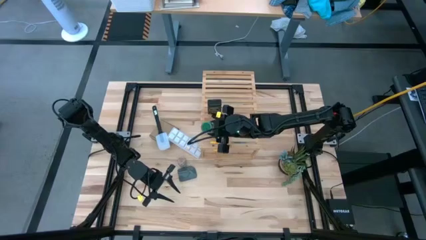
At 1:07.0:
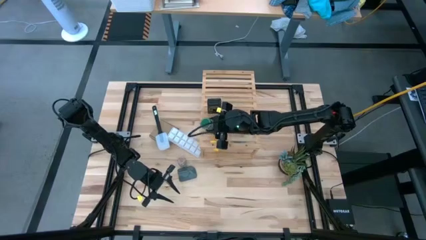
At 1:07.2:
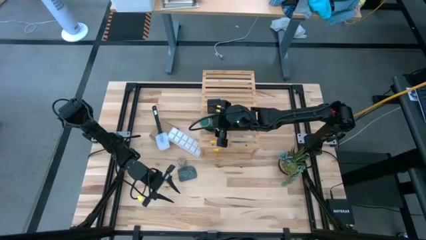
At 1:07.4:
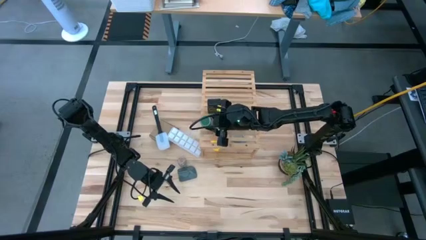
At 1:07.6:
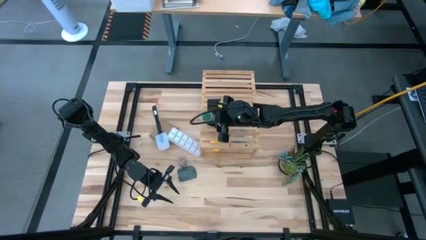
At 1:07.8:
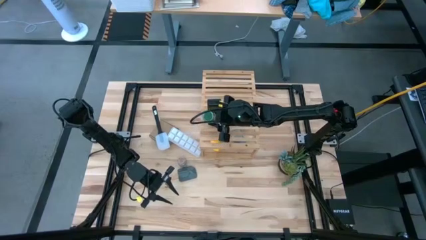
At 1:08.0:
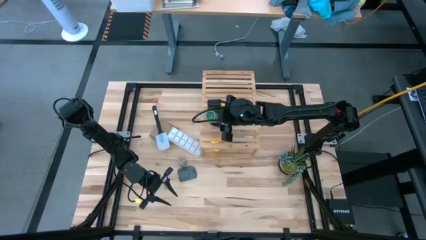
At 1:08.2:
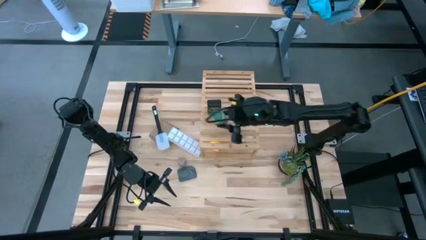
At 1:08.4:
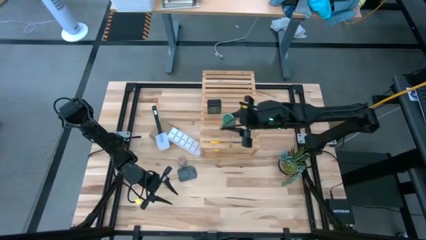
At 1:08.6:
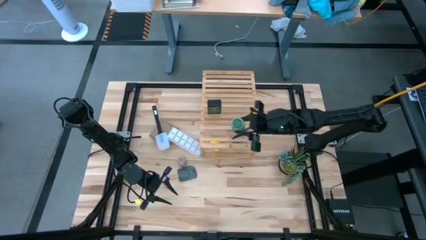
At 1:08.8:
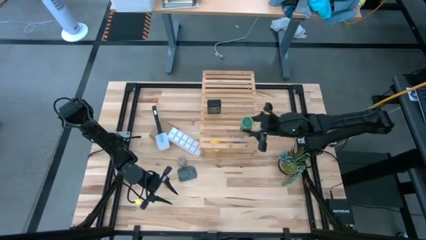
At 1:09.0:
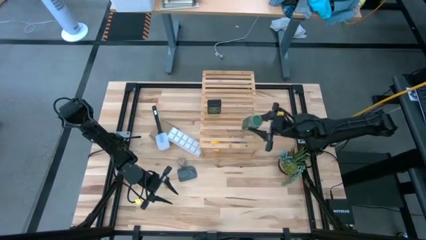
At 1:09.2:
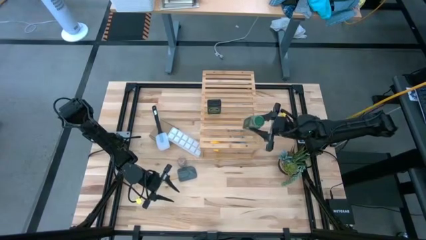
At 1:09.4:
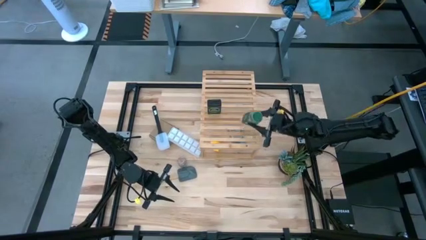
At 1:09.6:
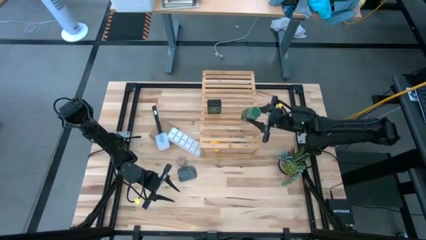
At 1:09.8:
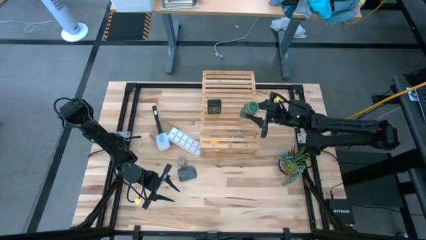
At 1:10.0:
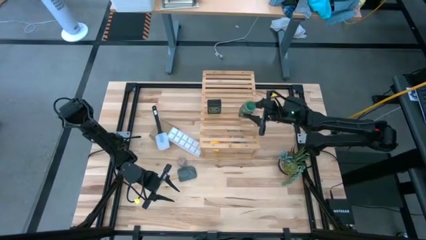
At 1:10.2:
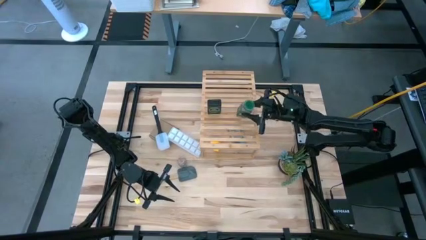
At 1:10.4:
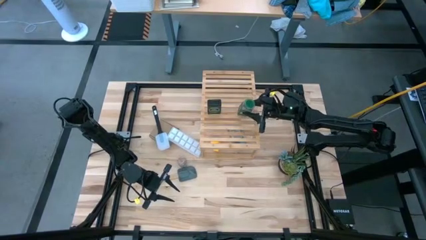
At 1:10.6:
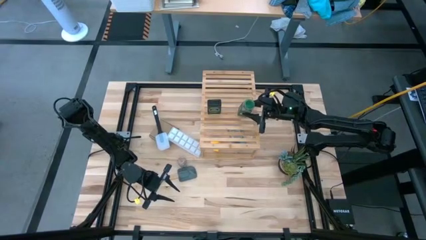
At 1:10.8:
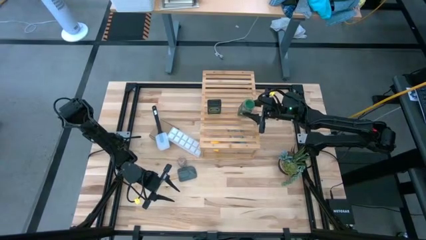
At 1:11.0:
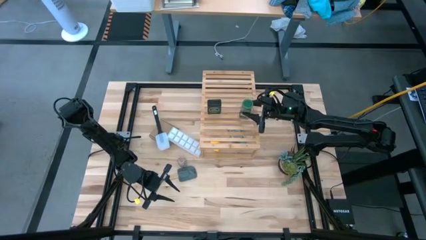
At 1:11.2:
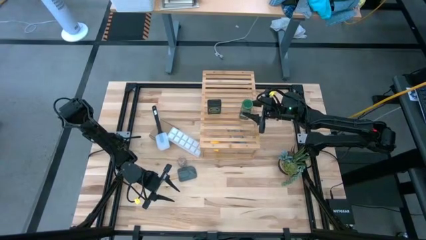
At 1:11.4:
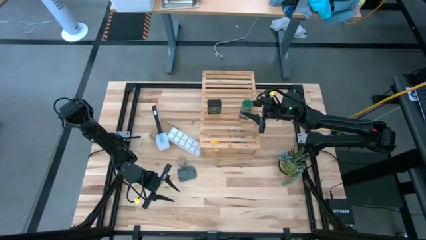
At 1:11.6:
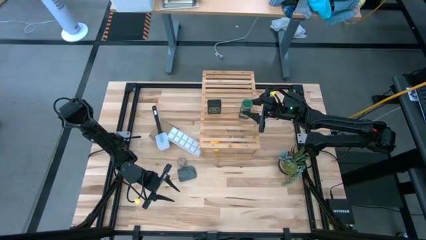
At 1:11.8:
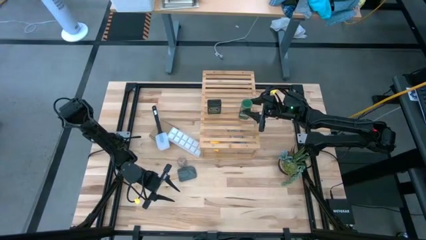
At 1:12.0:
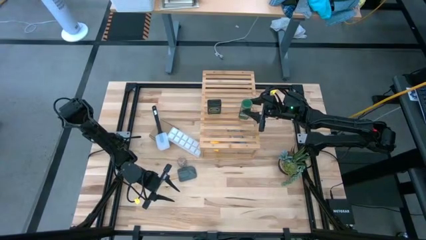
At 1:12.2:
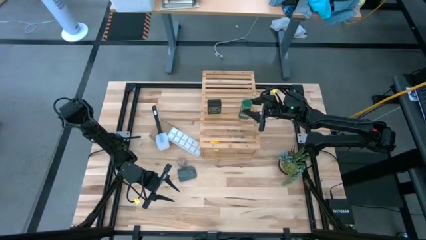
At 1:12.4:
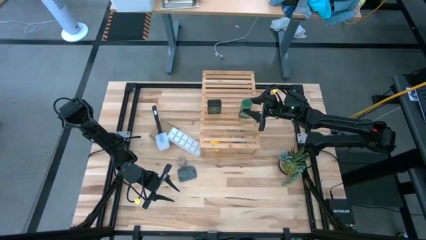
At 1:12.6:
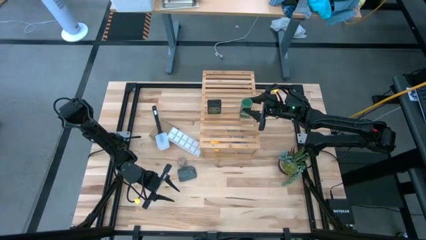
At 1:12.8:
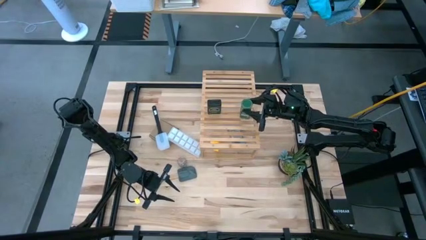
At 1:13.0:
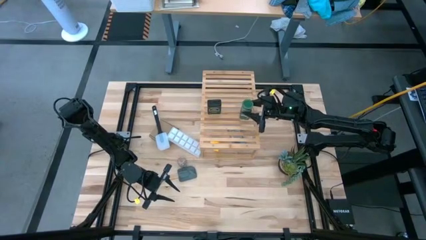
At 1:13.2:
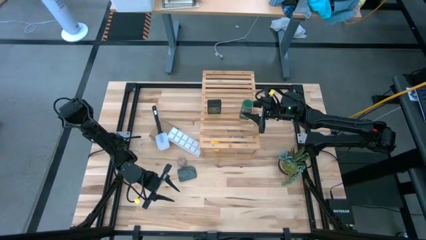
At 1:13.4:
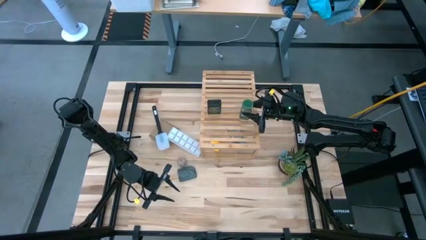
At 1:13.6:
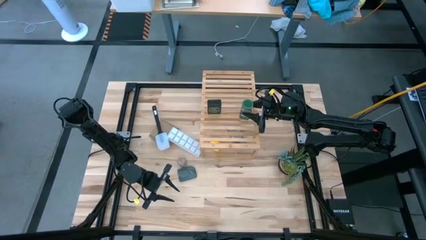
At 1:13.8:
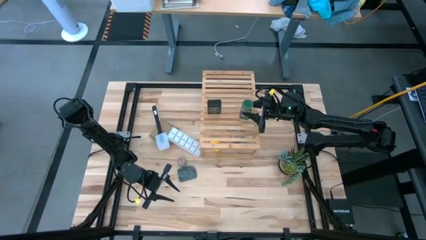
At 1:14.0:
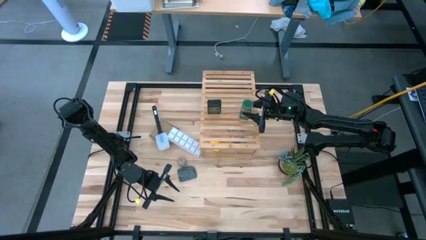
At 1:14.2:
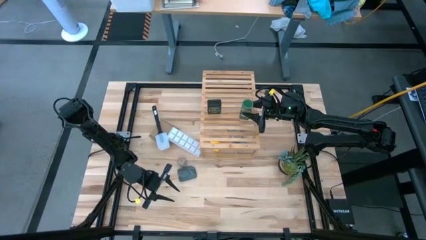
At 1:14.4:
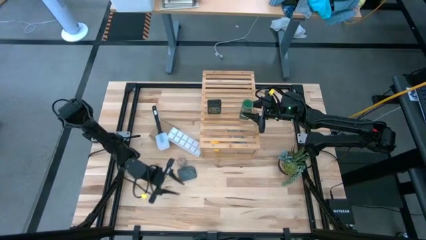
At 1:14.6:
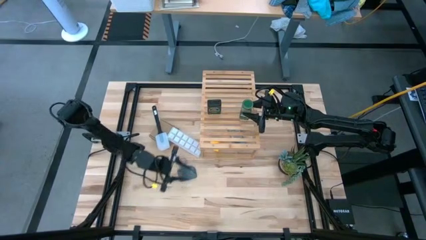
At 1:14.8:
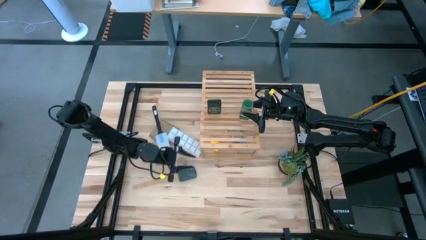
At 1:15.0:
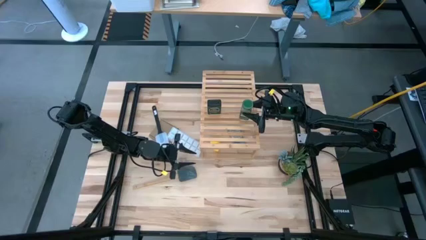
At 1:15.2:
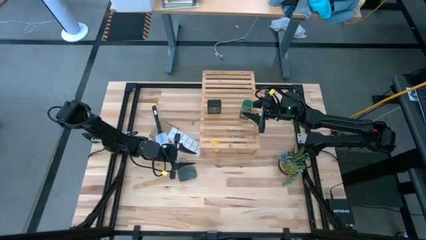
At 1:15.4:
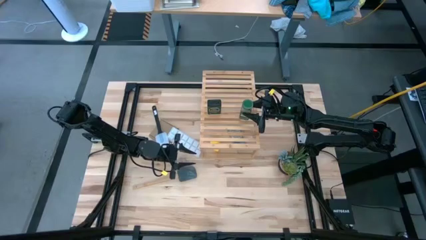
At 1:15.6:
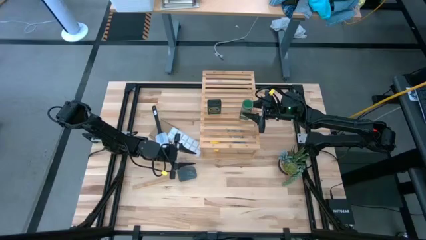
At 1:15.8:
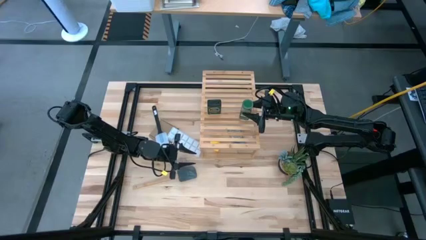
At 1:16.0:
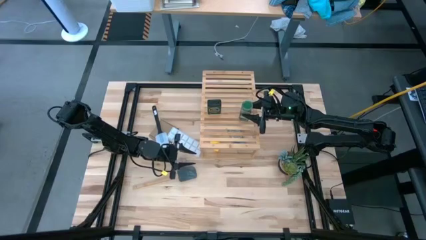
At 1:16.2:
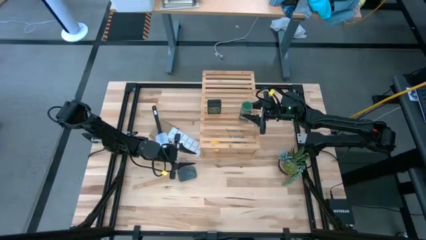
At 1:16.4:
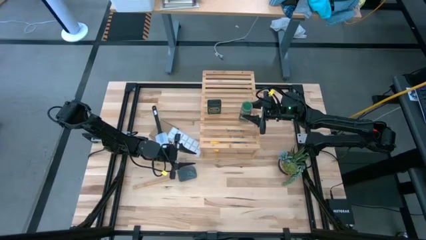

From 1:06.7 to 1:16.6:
Task: Shelf spices
Put the green seasoning bottle on the shelf
